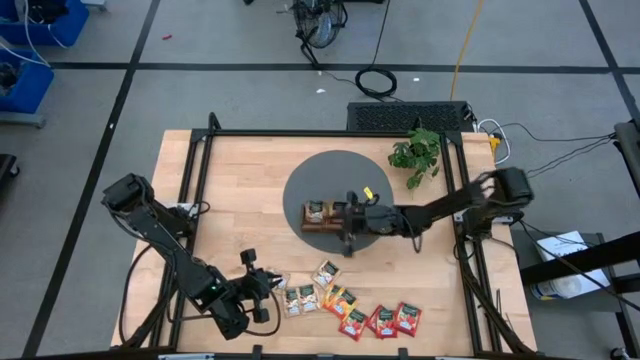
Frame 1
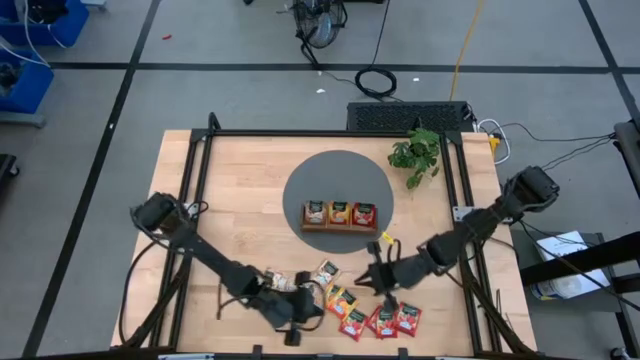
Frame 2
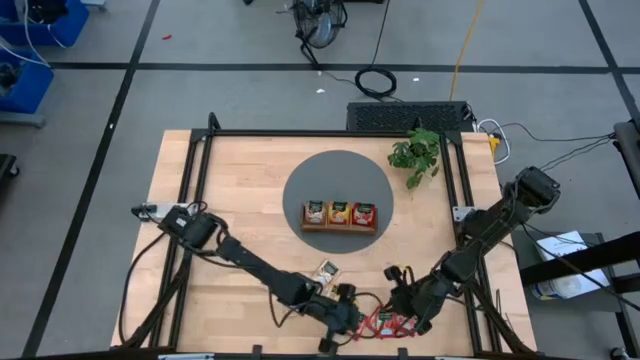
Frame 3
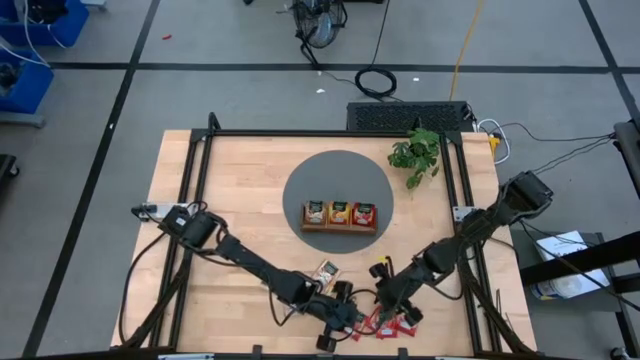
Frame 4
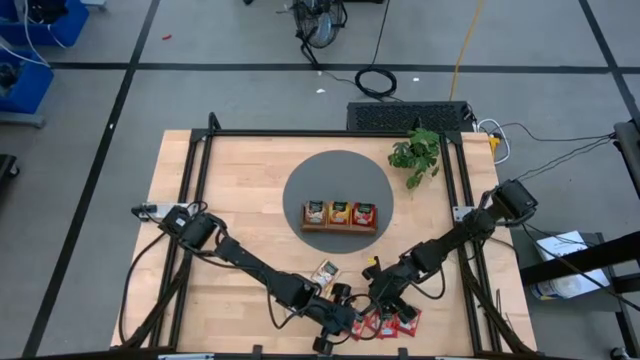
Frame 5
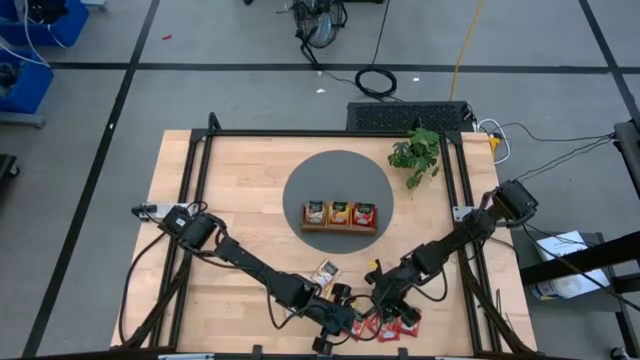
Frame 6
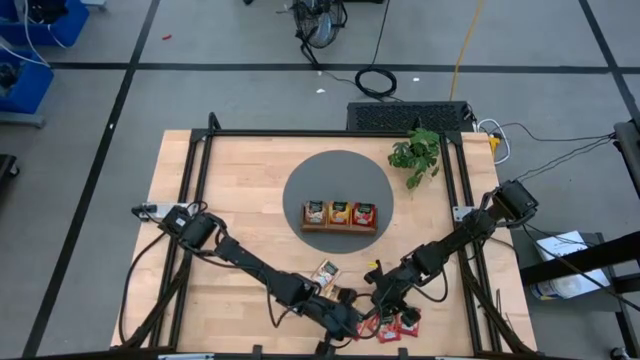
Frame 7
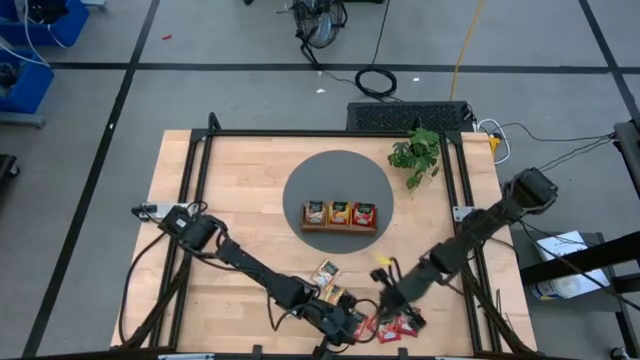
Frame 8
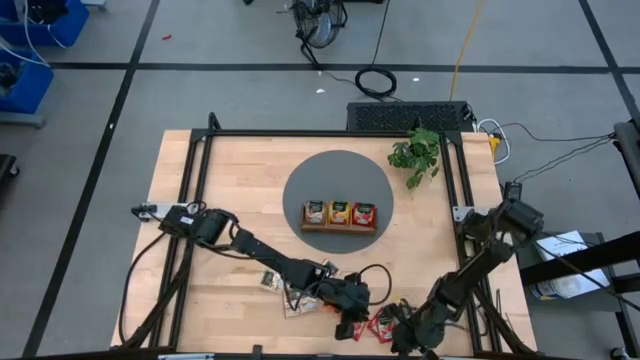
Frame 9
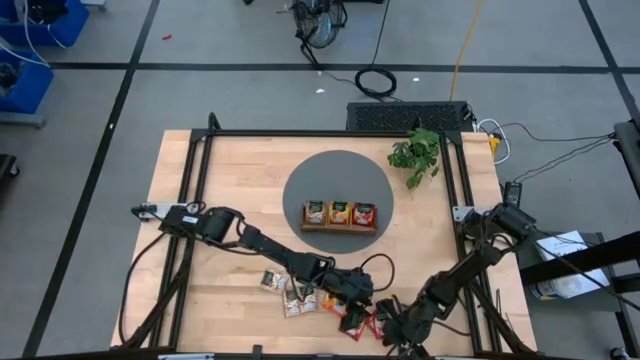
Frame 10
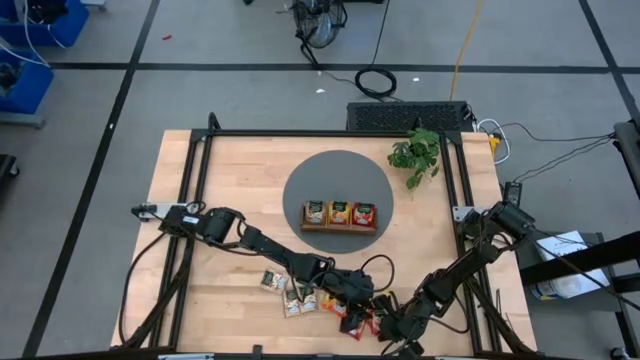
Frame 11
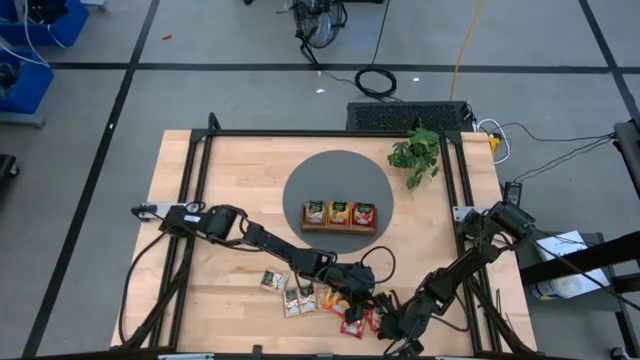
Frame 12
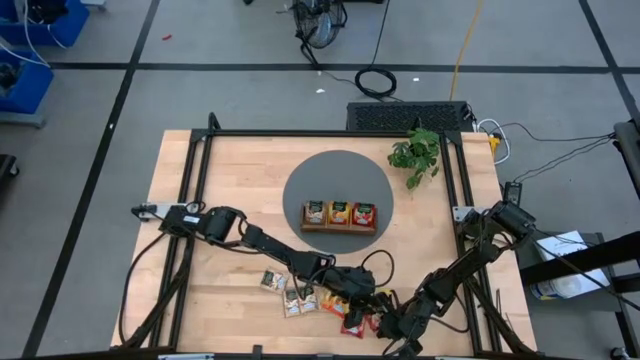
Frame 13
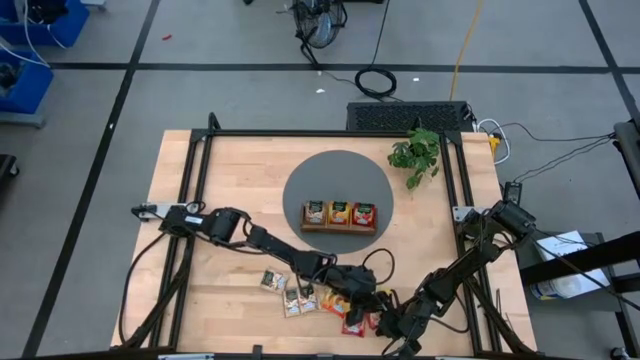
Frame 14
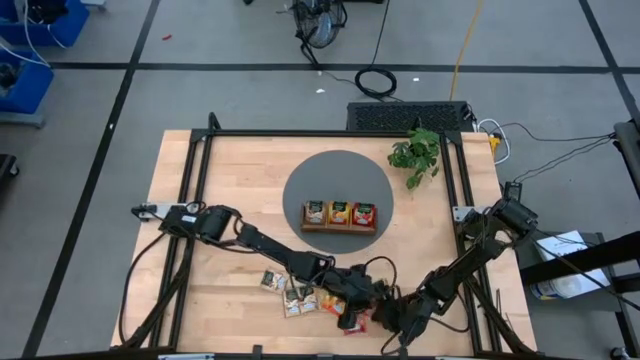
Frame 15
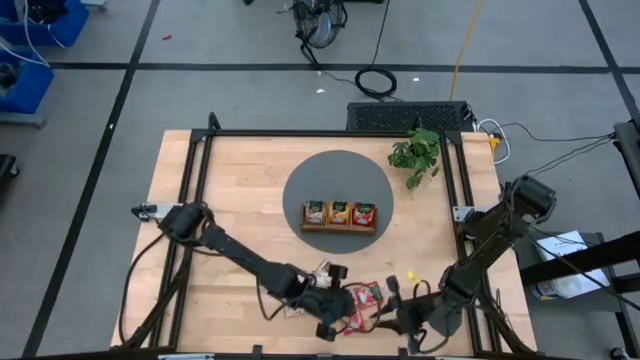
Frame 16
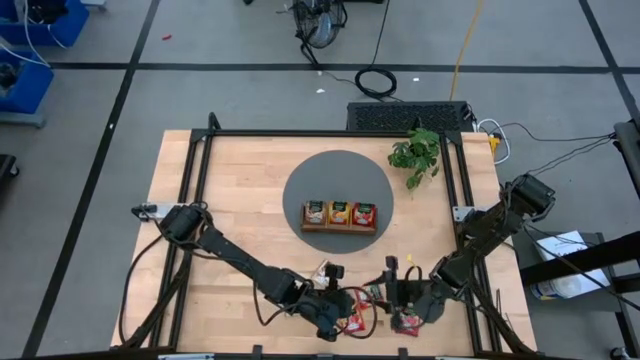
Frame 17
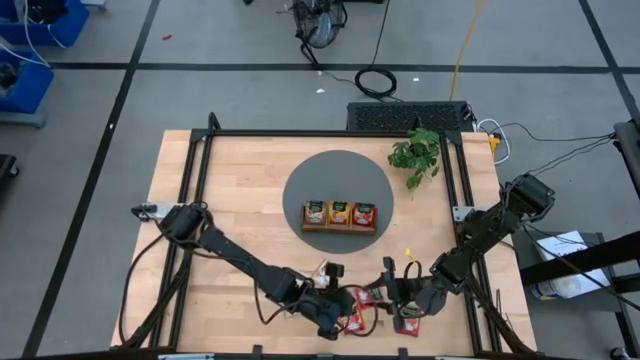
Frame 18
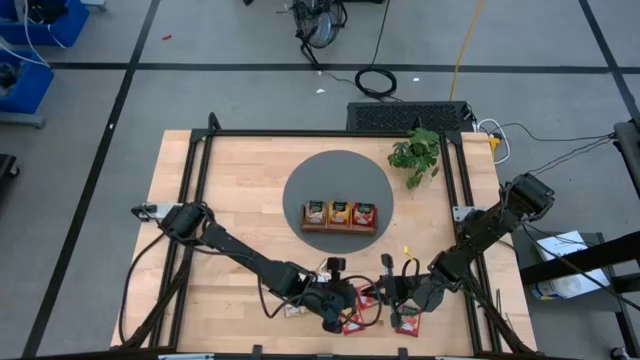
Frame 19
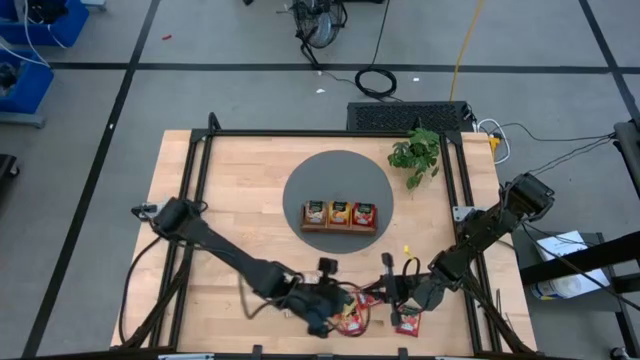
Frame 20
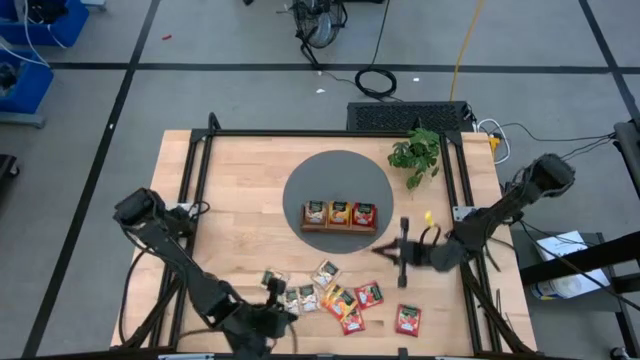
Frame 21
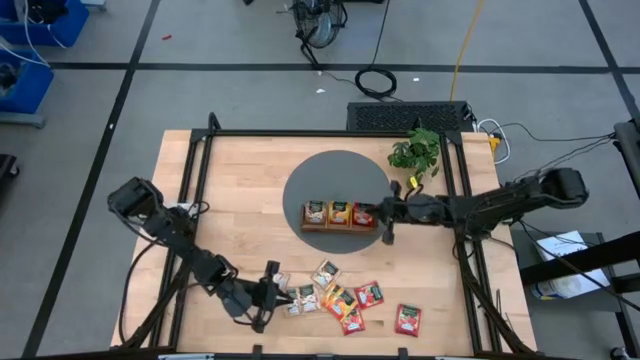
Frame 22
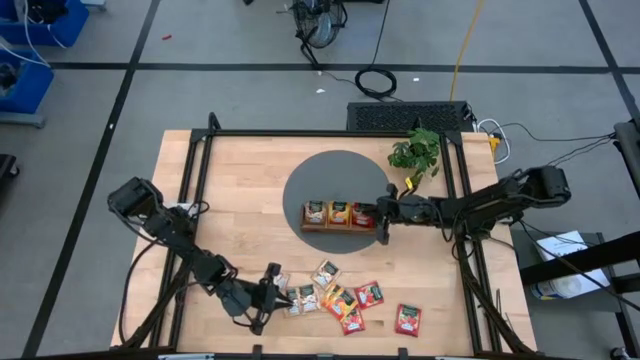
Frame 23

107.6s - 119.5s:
Task: Pick & Place Tea
Put the red tea bag into the right slot of the wooden organizer

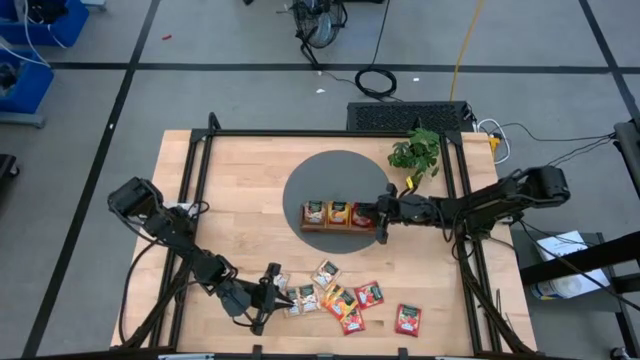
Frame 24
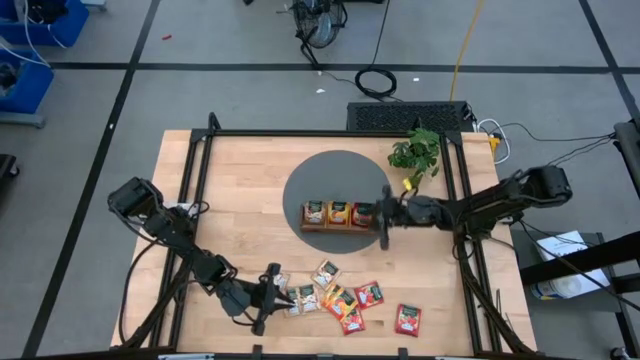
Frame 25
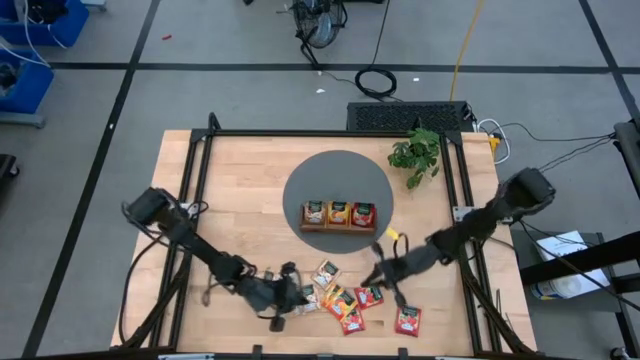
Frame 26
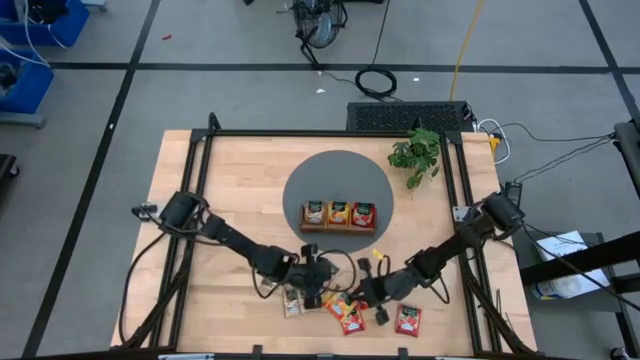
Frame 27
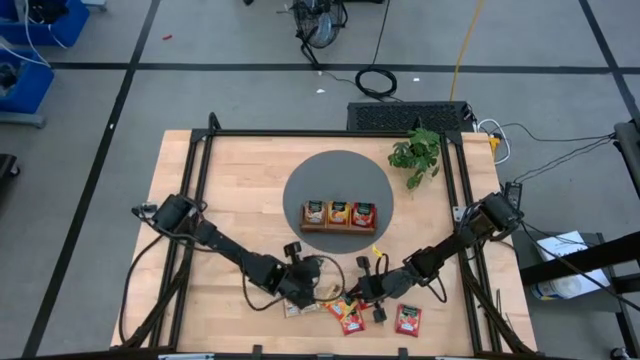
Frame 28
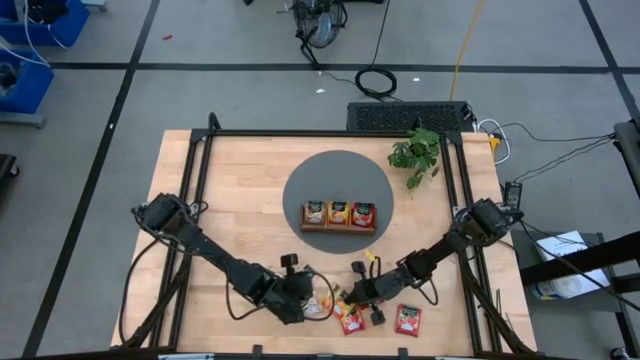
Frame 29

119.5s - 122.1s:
Adjust the brown tea bag on the table

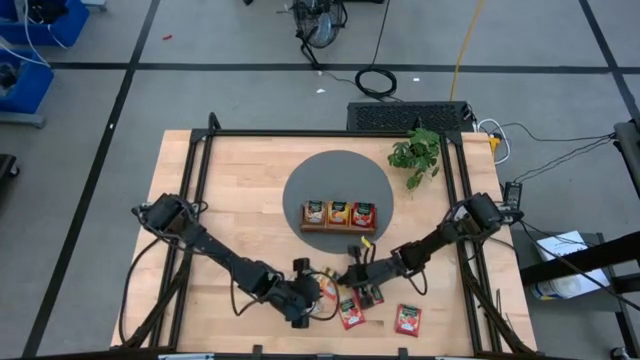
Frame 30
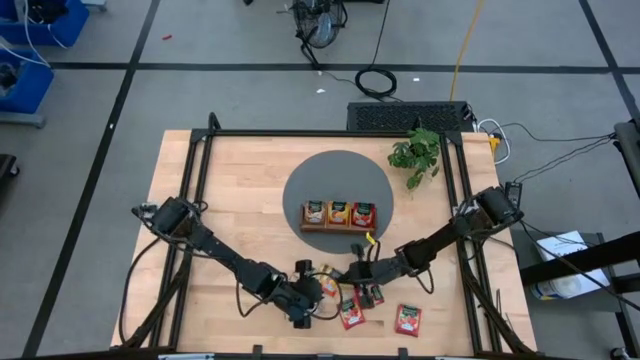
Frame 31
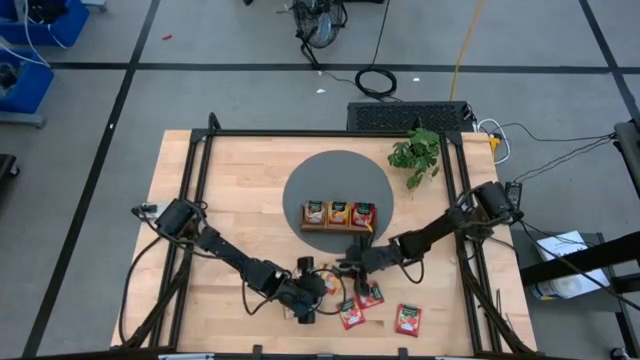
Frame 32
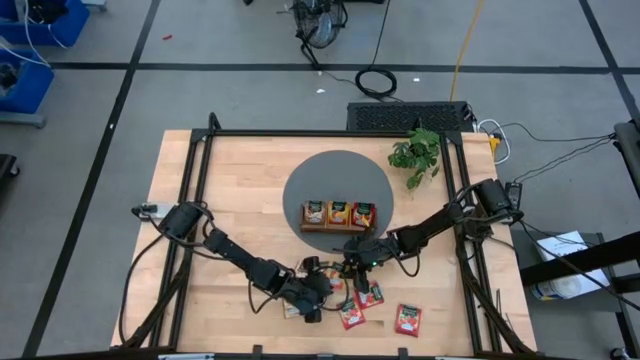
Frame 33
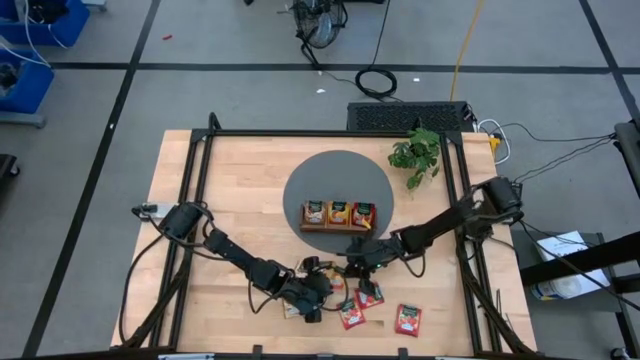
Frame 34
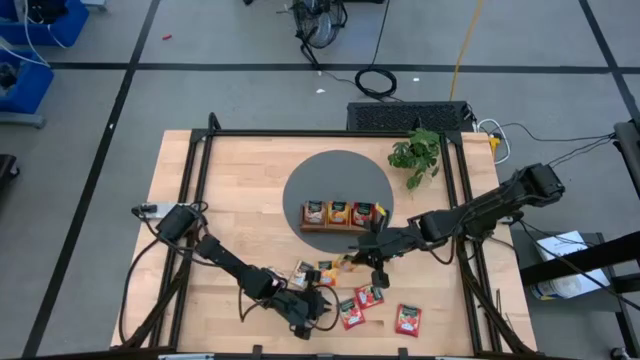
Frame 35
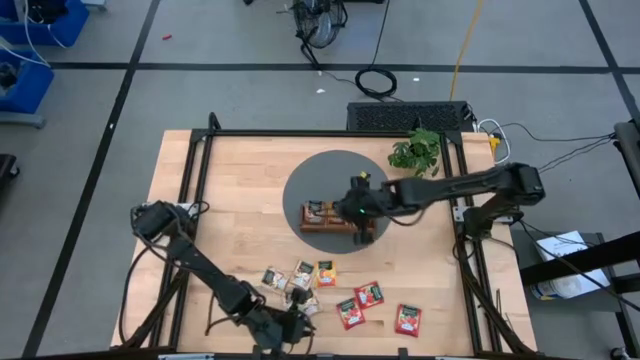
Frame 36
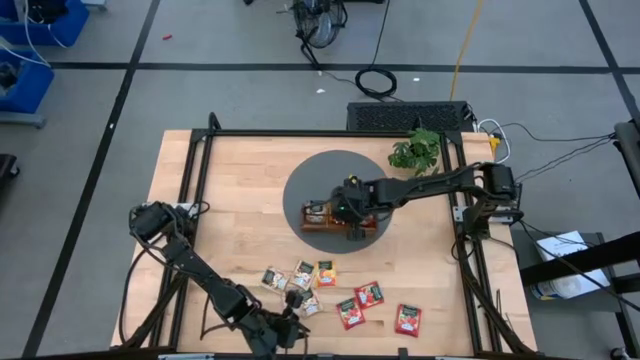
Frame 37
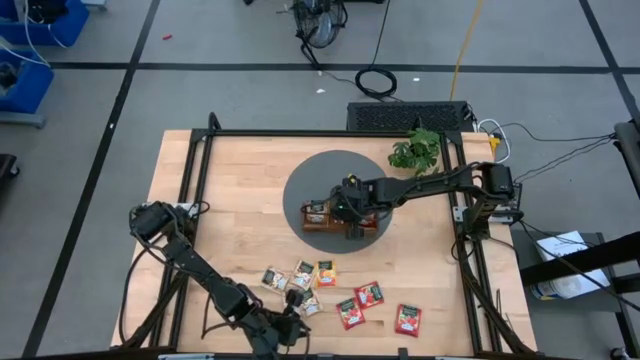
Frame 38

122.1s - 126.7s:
Put the right orange tea bag into the middle slot of the wooden organizer

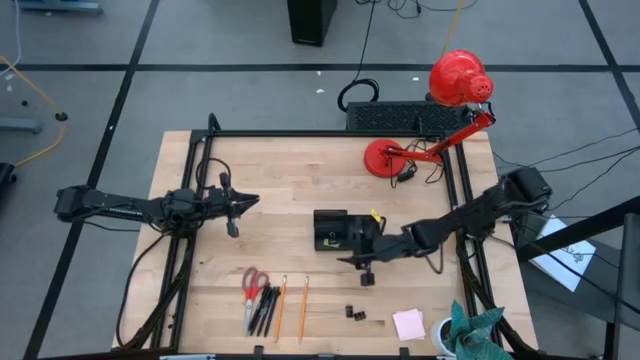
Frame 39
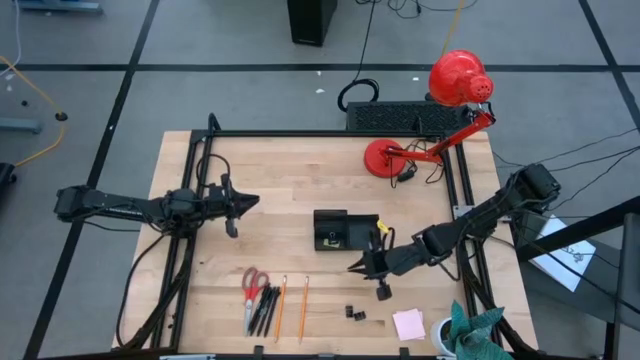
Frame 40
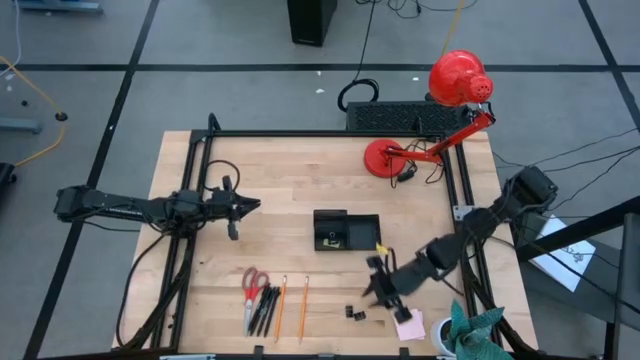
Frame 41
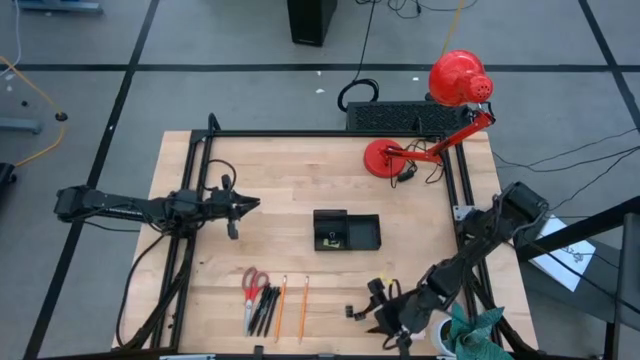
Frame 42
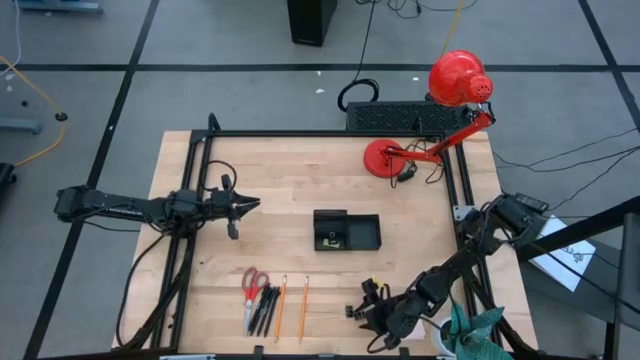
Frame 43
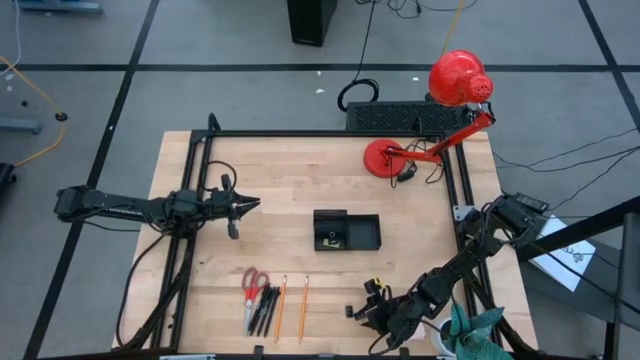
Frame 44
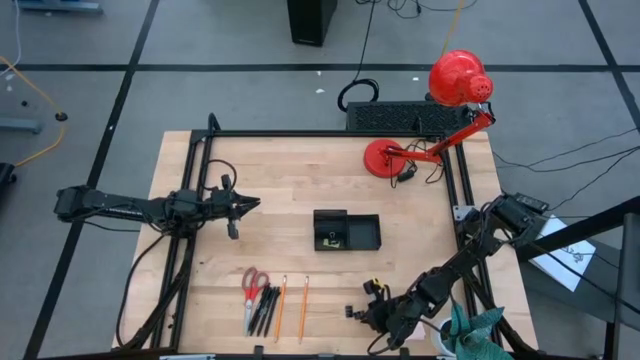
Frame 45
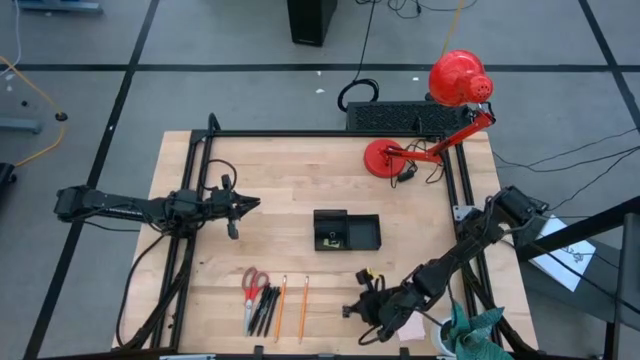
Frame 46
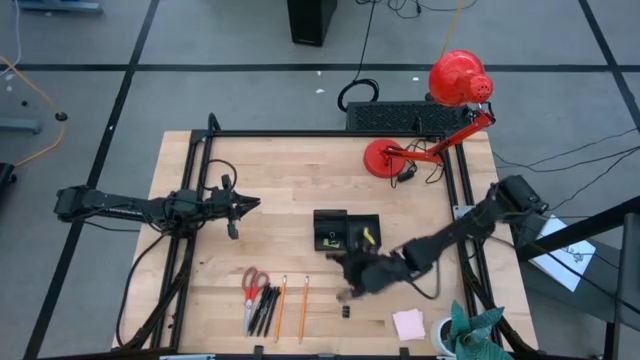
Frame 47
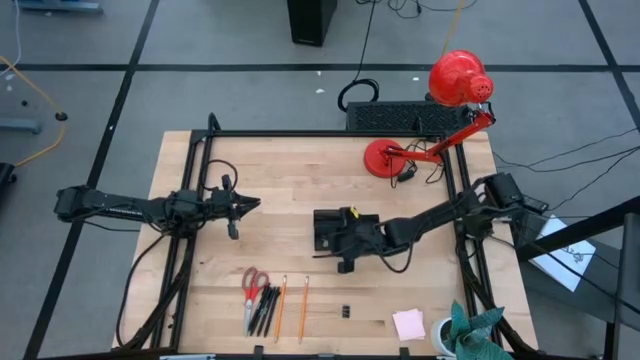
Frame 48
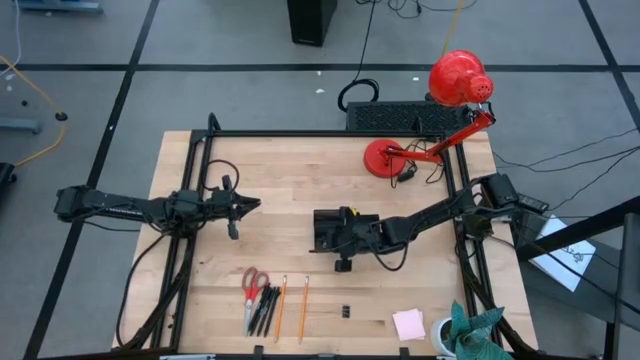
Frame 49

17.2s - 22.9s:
Task: Pick and place office supplies into organizer
Put the right binder clip into the desk organizer
